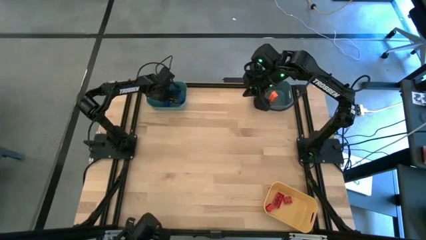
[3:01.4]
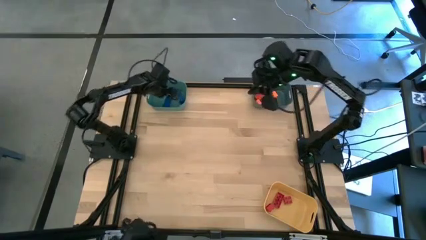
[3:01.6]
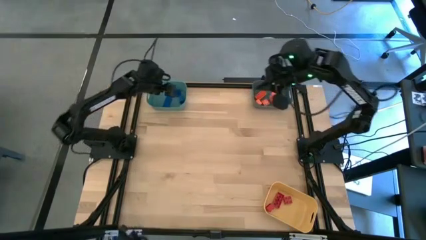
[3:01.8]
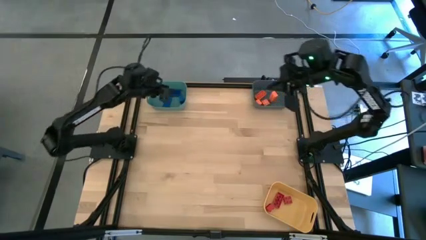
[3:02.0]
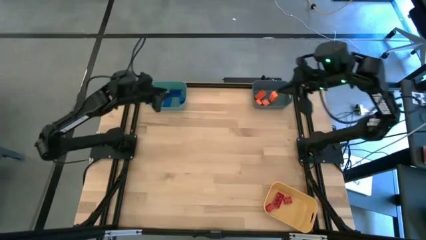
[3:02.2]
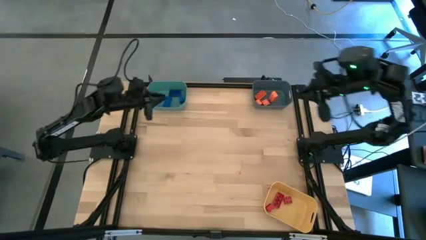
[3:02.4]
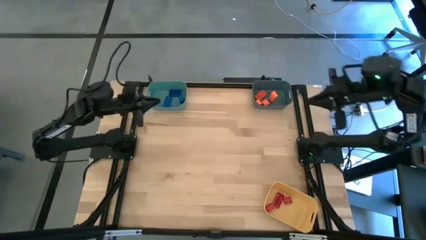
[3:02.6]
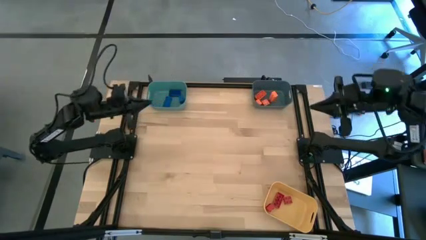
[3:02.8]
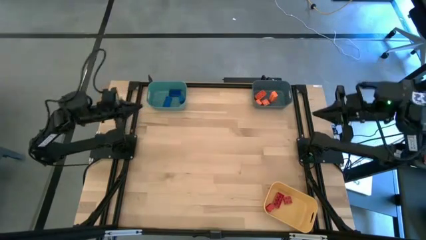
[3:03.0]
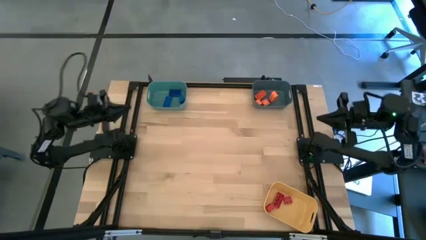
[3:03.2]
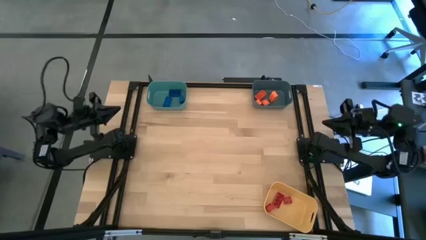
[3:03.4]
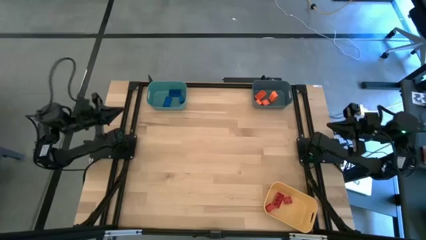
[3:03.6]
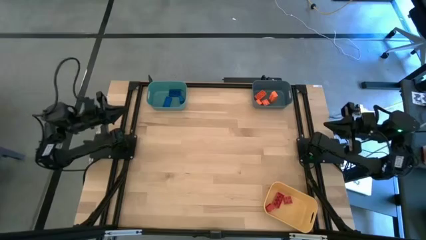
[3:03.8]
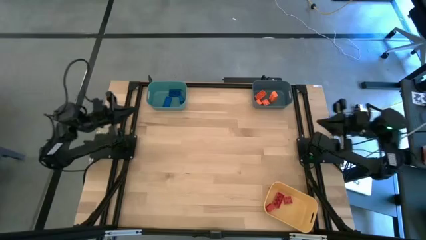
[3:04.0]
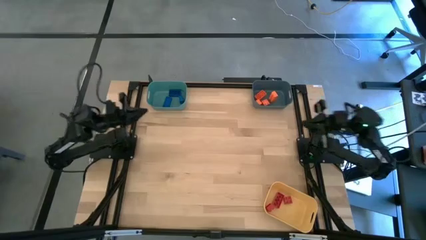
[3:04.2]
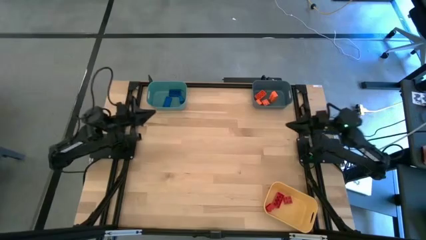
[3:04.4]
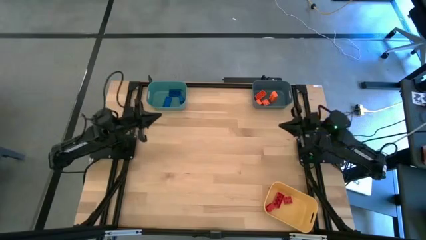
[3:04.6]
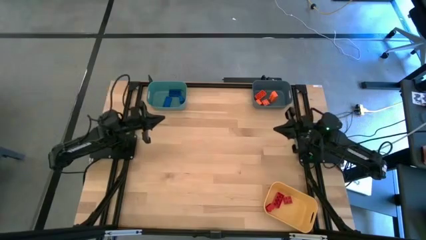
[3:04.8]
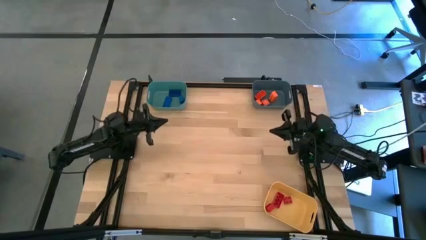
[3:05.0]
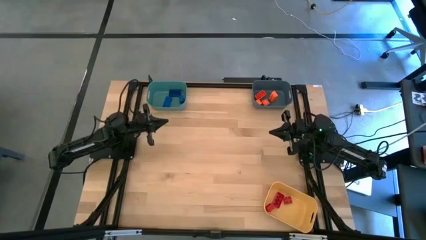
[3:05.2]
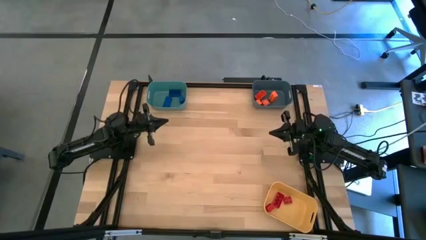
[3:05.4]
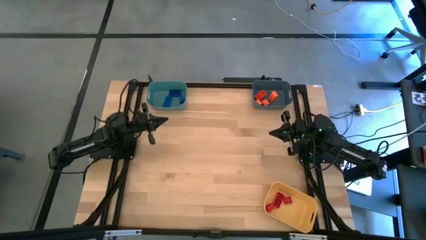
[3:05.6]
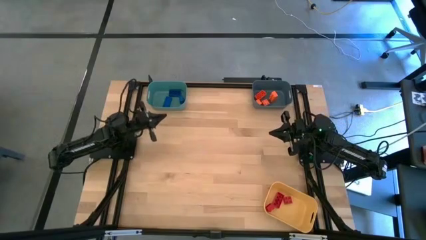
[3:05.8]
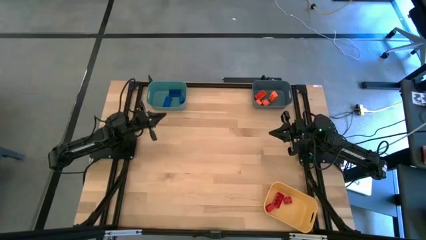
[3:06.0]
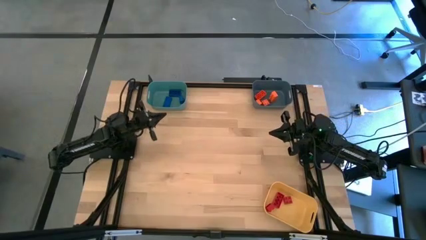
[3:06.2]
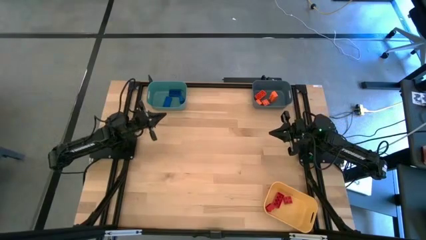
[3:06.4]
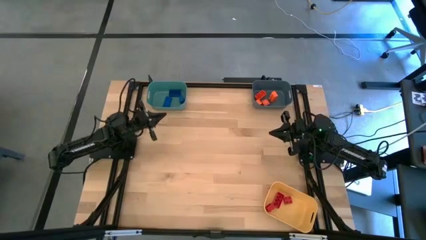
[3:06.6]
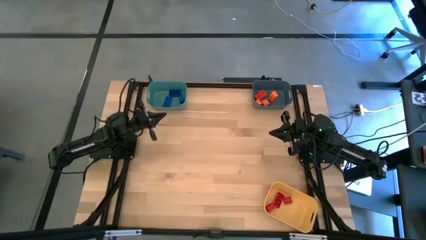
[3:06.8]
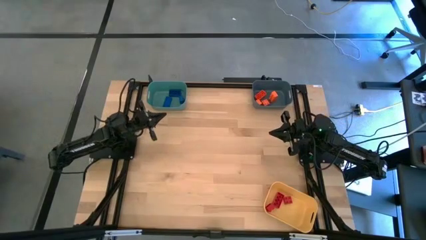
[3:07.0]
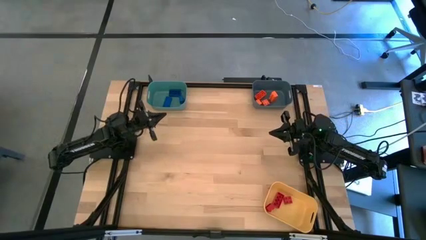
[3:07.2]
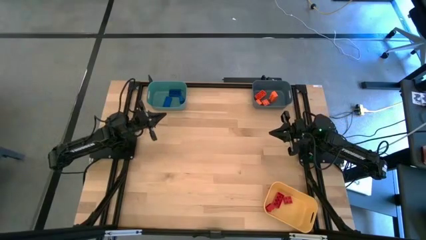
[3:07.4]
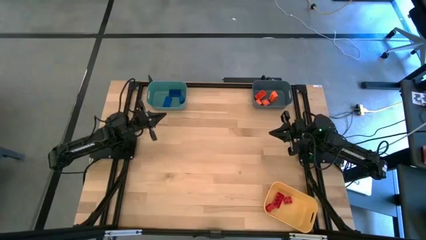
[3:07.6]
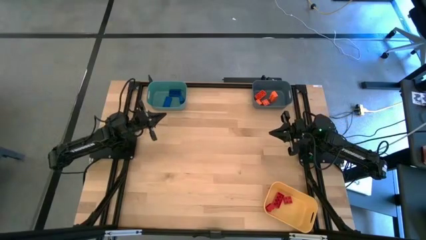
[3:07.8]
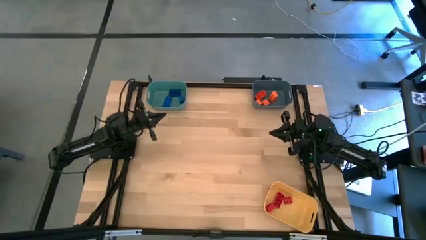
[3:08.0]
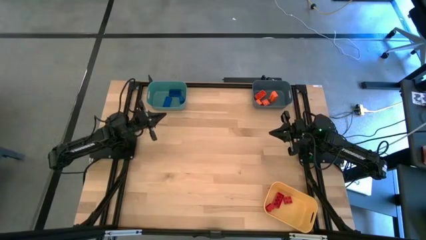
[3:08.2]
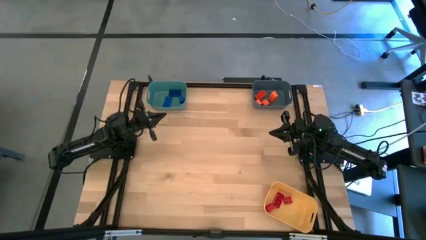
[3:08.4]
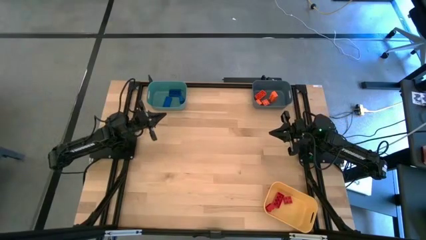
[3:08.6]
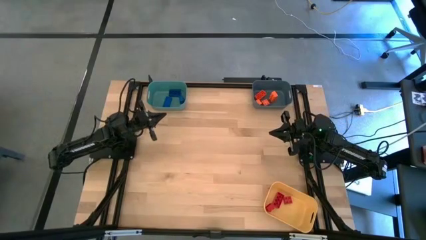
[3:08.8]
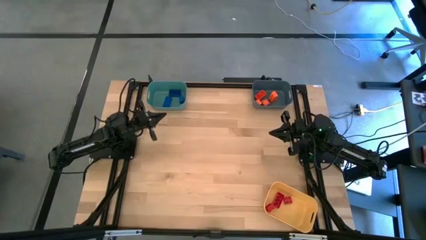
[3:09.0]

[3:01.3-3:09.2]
Task: Sort & place blocks by color
Return to Home Position

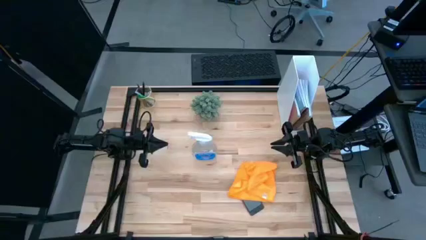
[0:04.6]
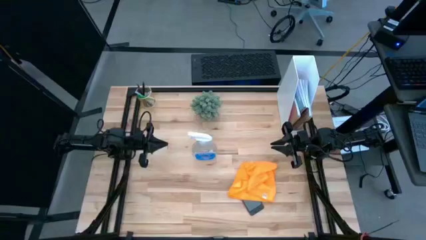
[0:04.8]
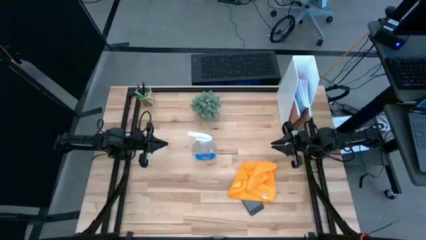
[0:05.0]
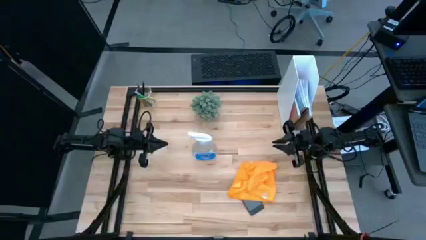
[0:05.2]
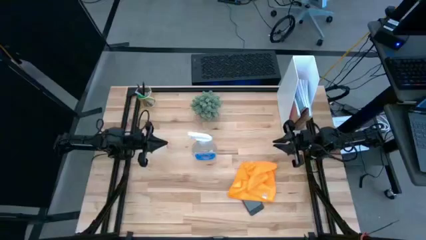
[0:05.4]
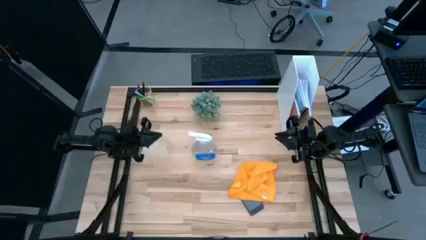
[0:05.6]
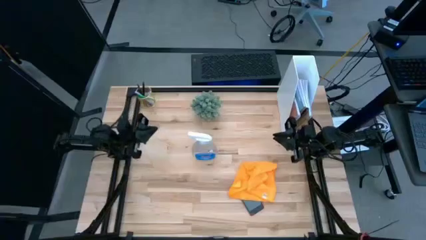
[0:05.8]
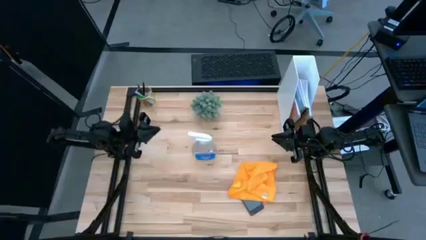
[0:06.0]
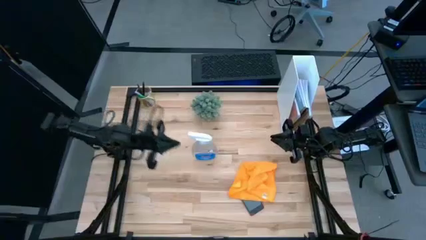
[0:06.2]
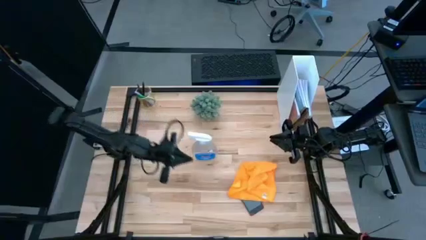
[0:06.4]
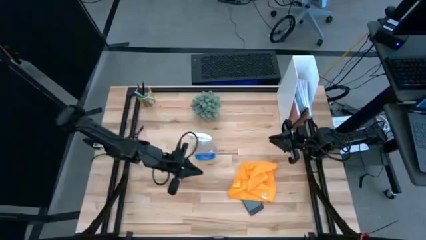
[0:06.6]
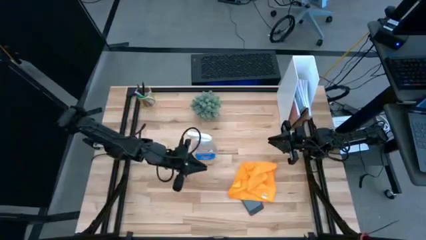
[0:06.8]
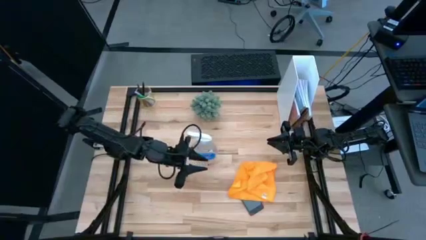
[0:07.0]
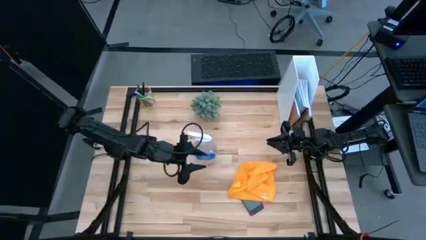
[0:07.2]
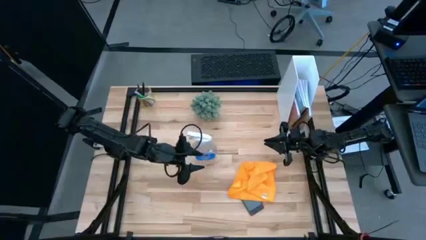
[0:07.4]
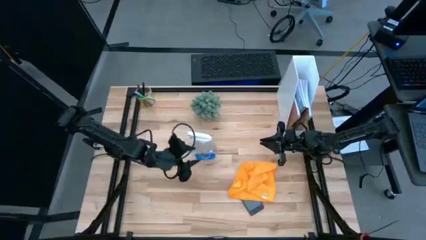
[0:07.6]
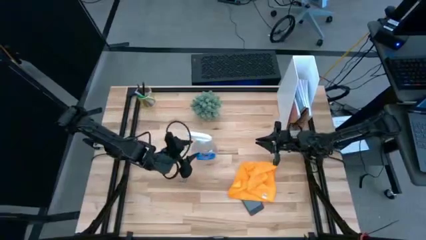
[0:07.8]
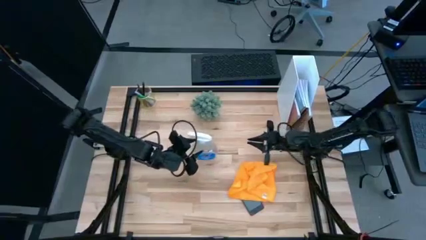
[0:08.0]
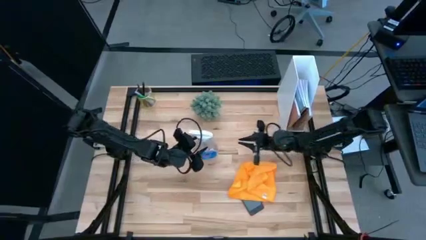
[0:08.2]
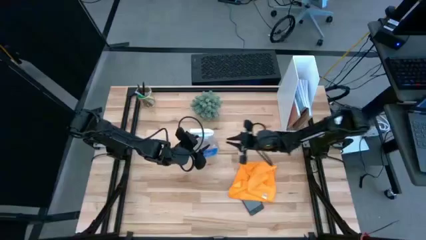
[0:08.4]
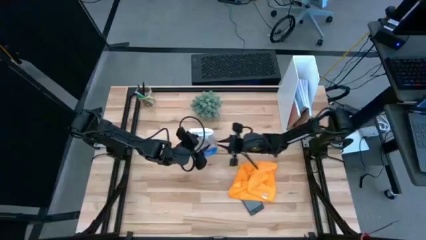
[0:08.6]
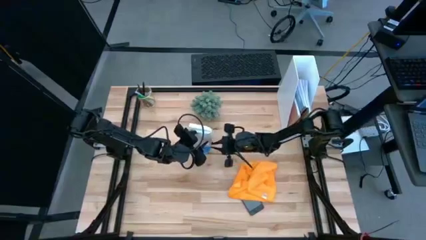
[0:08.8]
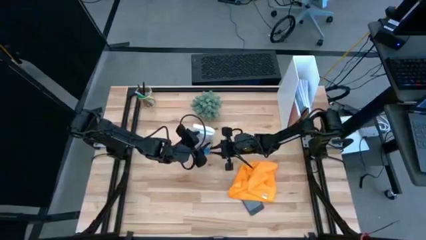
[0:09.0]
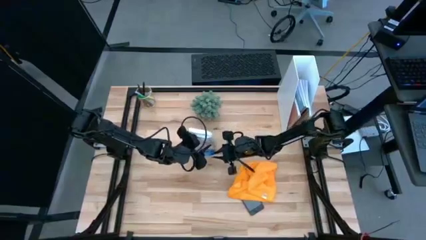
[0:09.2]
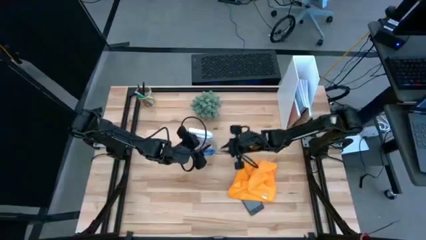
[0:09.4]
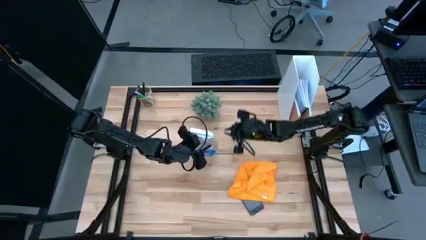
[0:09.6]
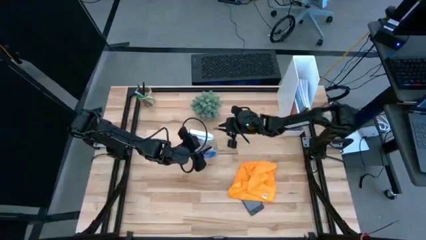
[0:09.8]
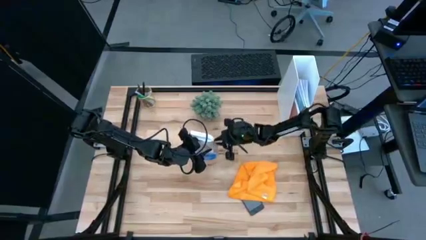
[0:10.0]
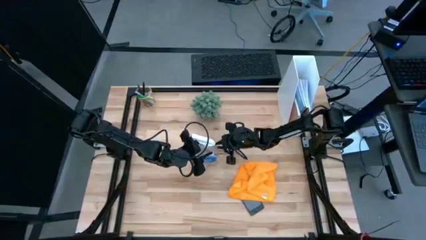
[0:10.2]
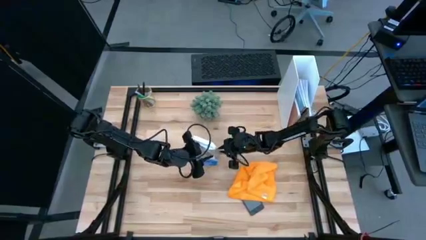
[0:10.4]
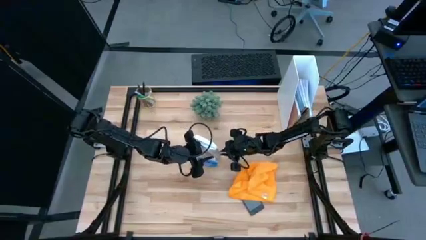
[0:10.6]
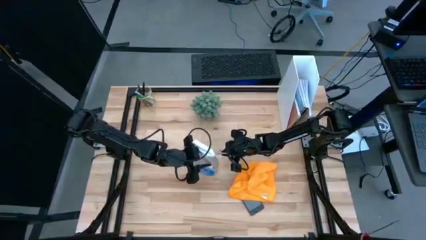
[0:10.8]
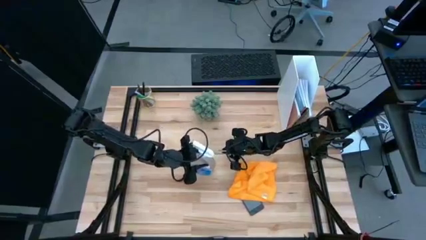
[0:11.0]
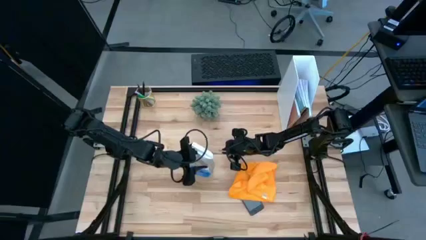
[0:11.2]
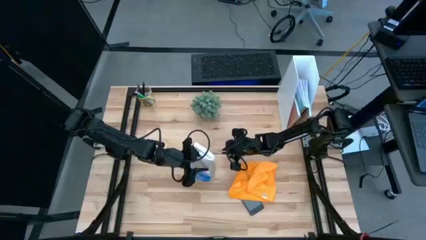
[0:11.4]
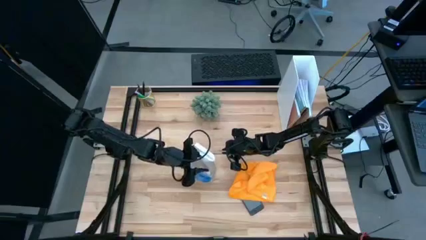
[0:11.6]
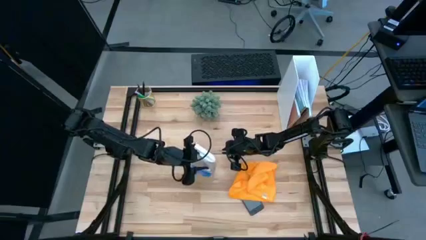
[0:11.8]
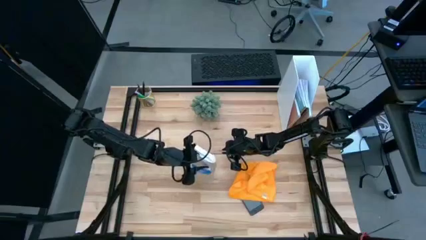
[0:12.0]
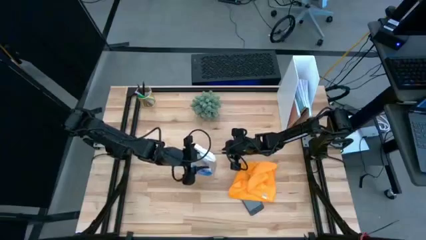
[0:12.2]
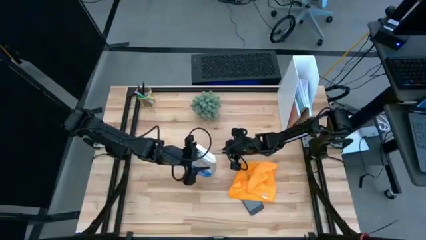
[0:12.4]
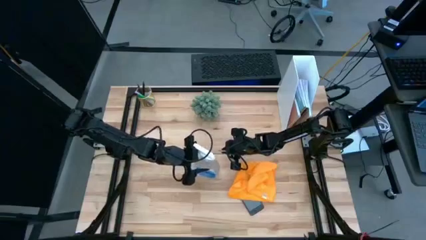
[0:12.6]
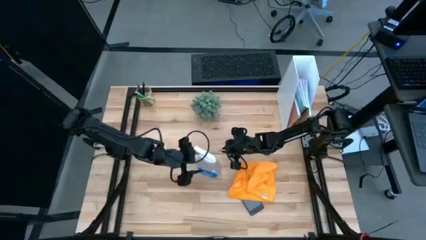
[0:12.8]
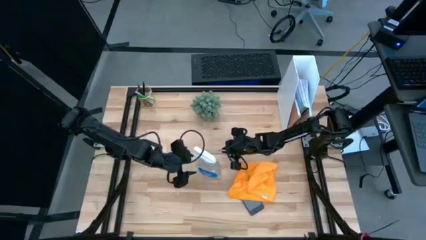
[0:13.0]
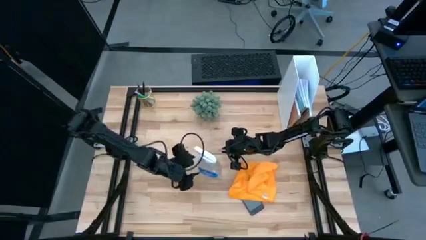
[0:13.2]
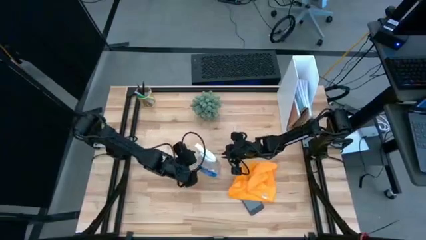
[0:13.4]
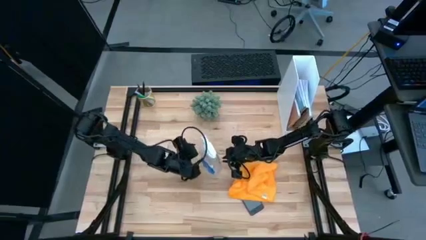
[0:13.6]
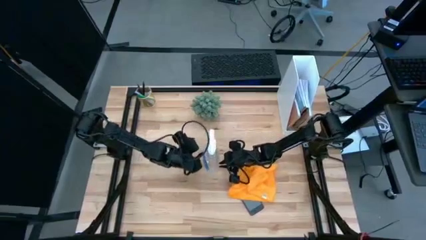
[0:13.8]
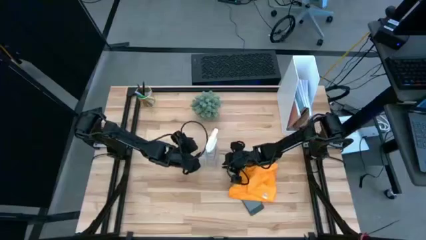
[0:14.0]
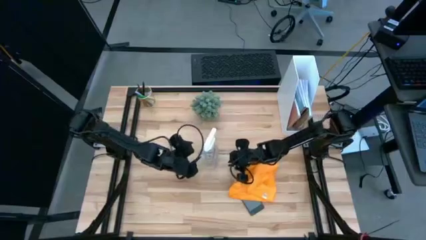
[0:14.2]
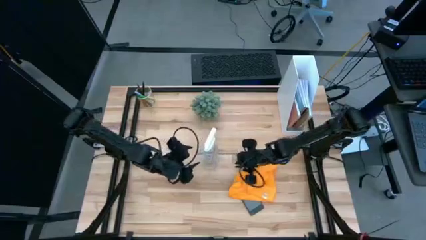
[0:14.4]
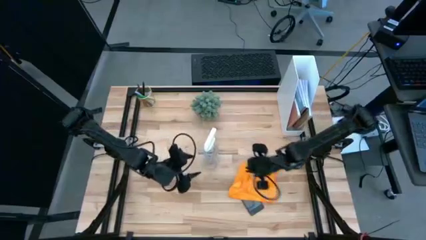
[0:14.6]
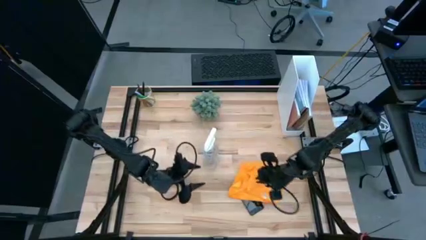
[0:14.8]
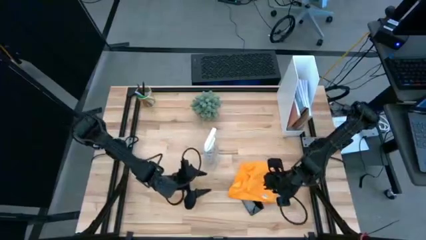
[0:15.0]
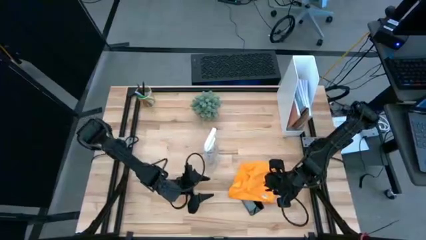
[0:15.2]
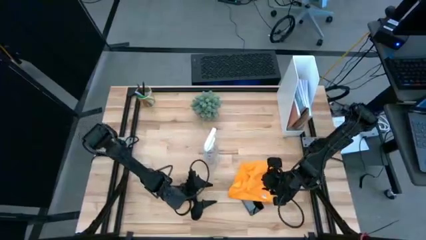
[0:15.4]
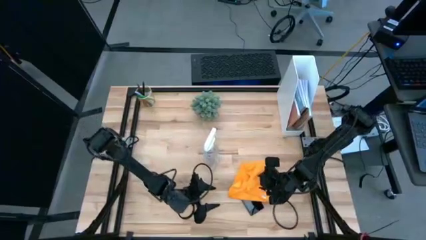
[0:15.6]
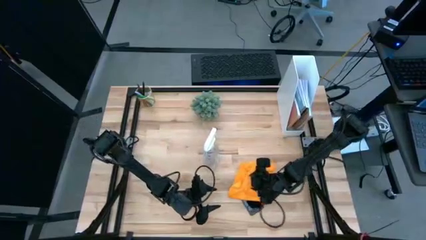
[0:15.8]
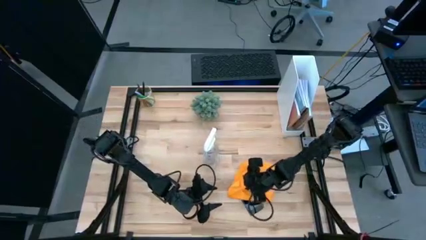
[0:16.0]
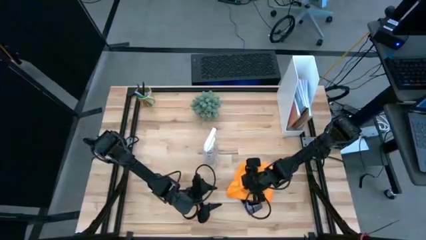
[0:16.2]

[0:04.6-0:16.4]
Task: Apply microfiber cloth
Spray the front of the cellphone using the spray bottle
